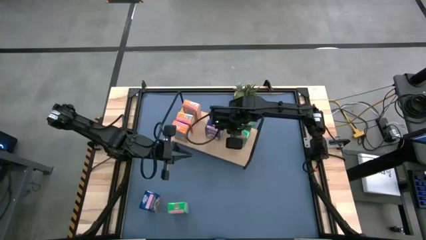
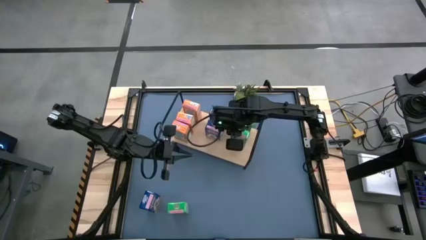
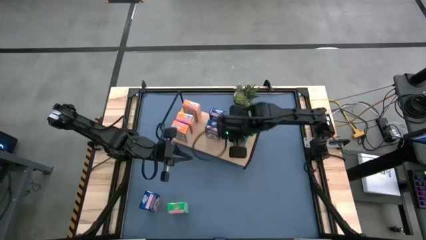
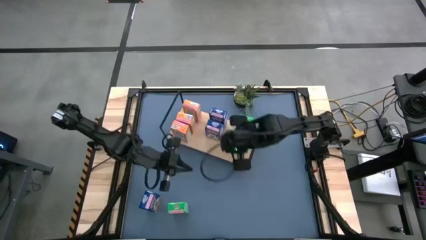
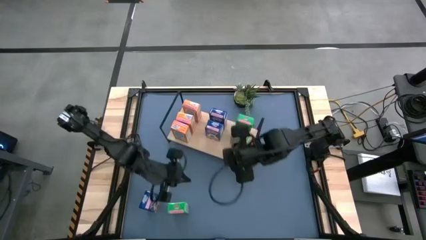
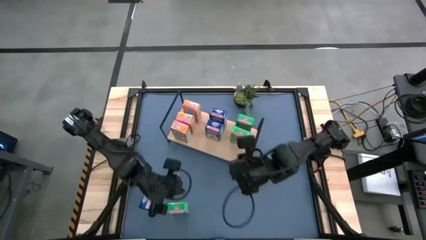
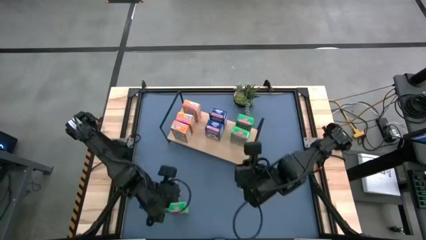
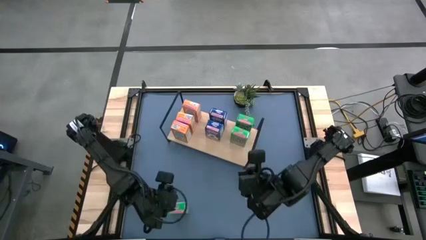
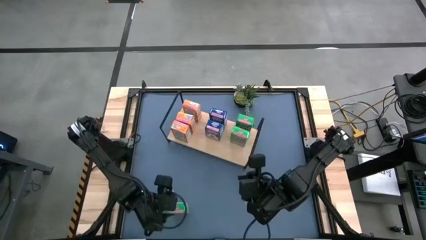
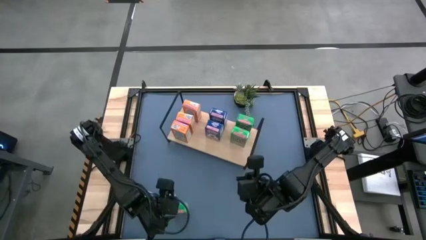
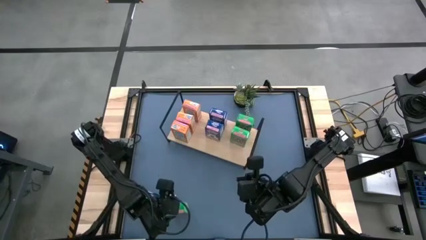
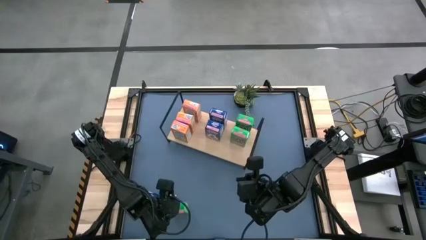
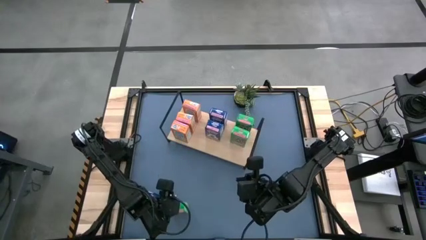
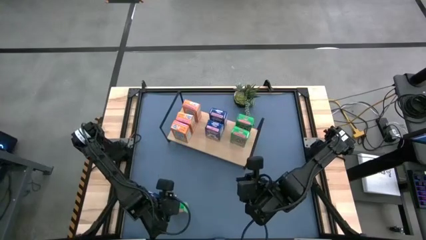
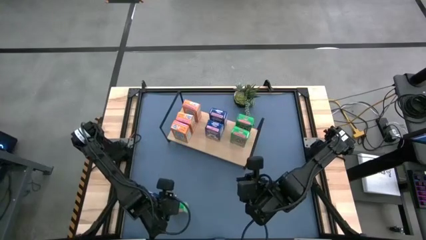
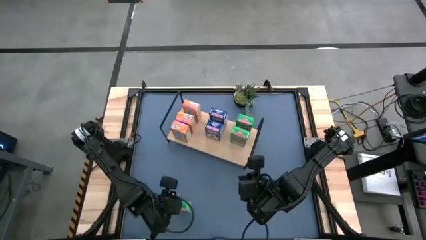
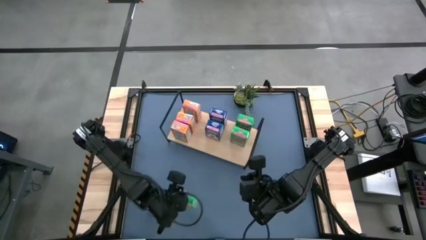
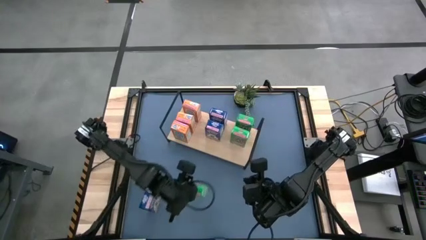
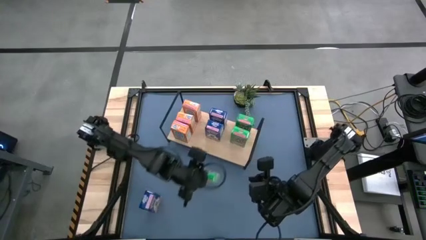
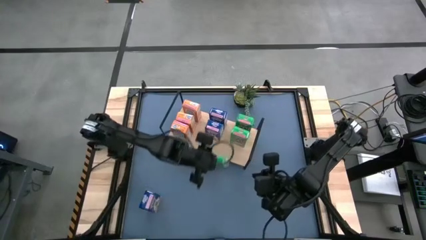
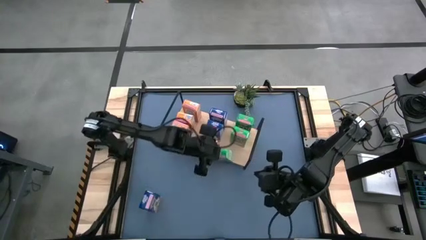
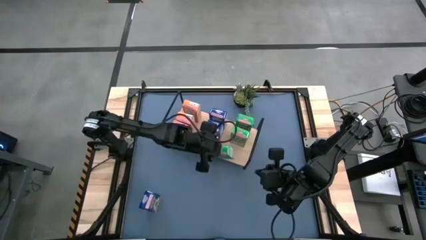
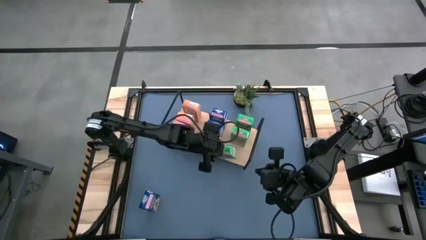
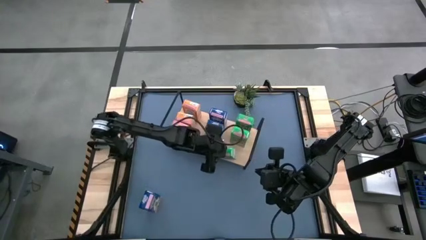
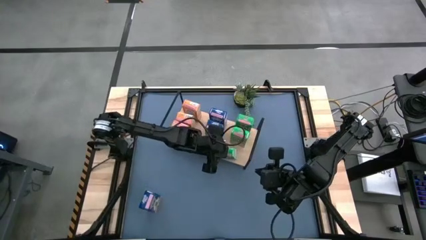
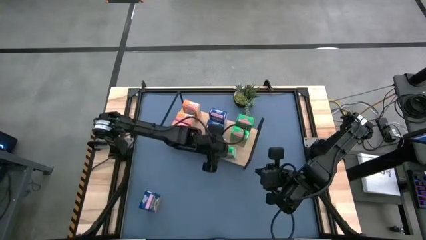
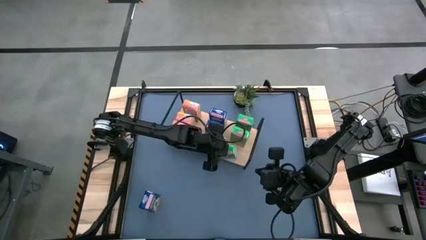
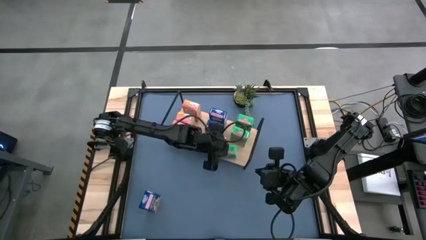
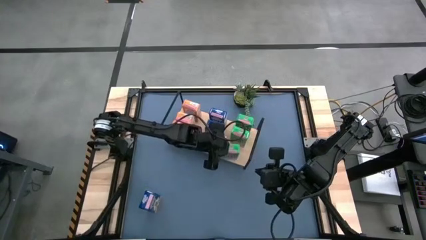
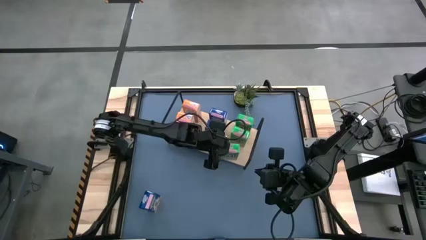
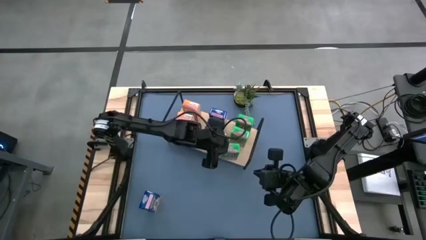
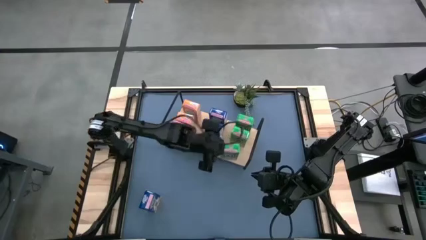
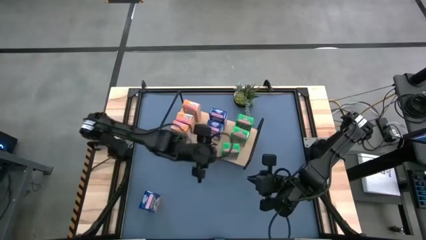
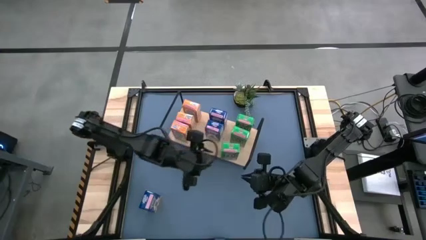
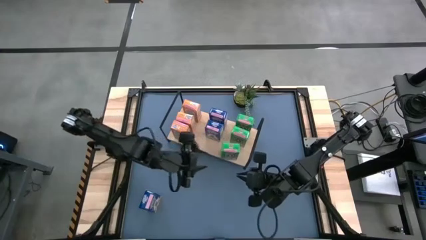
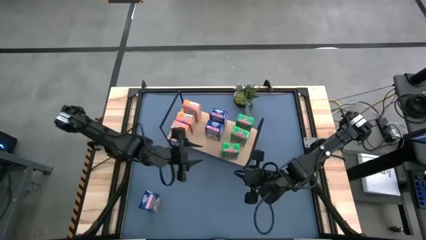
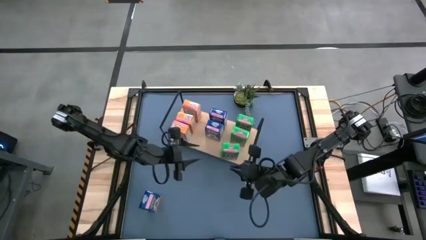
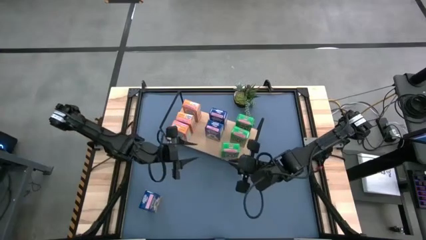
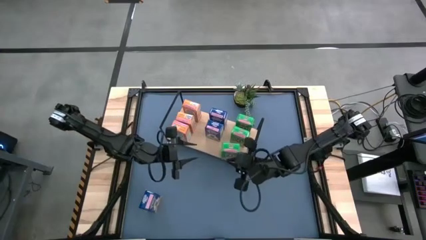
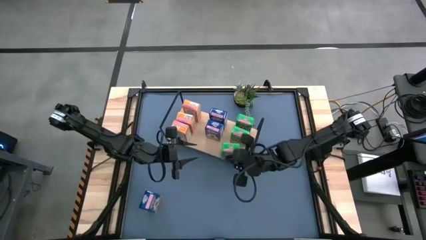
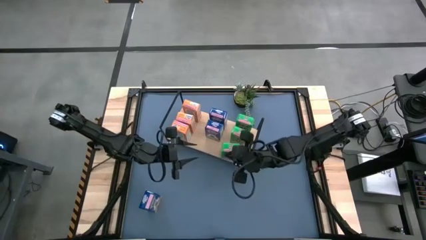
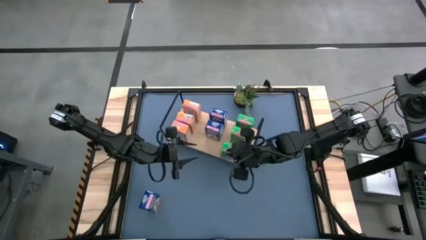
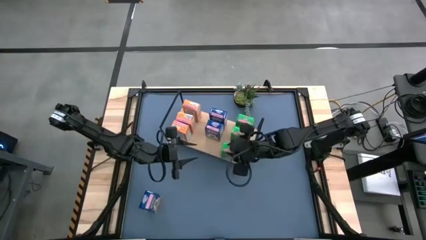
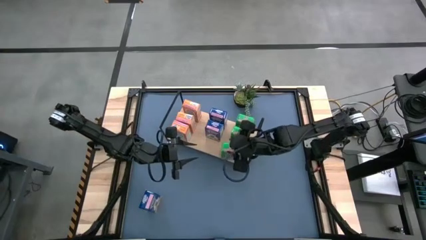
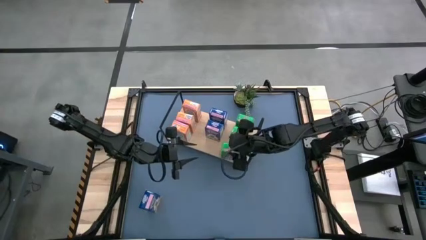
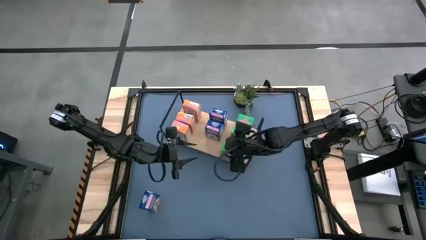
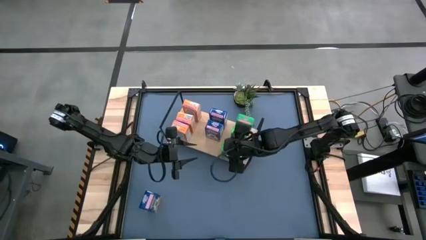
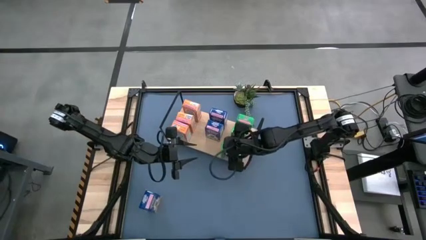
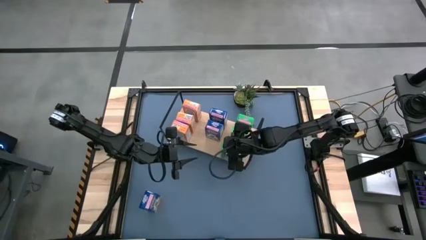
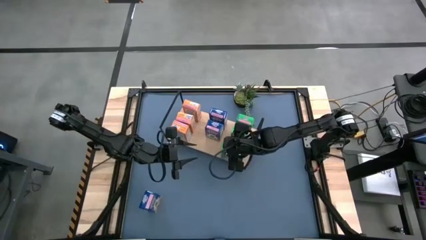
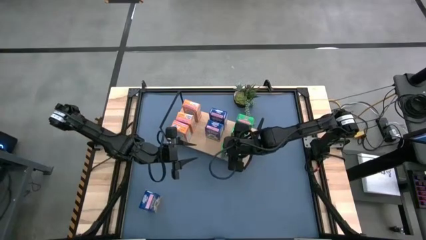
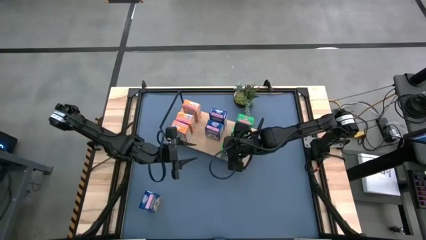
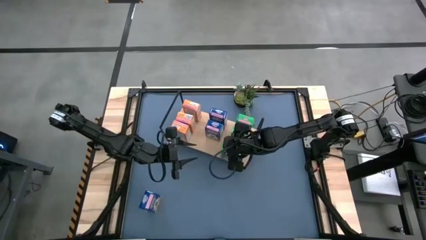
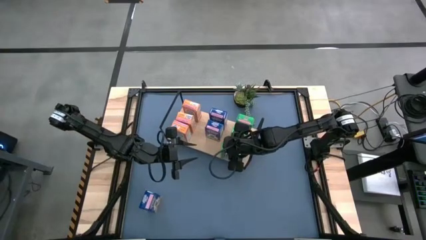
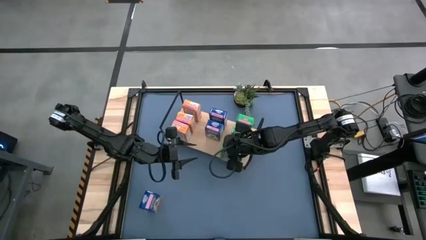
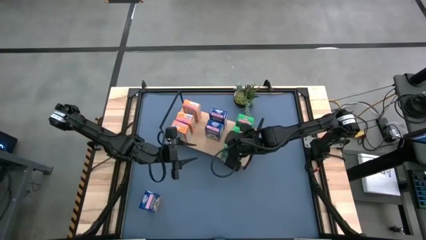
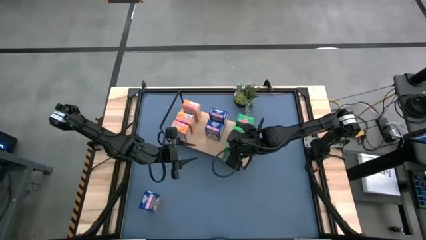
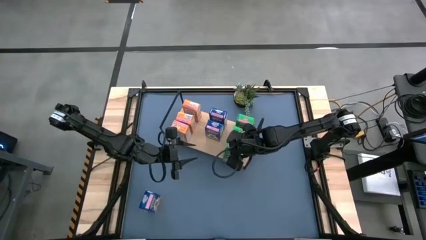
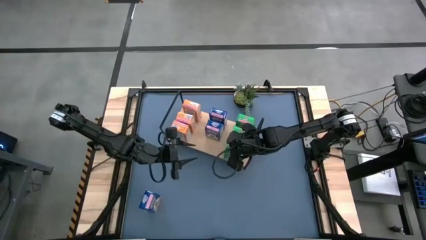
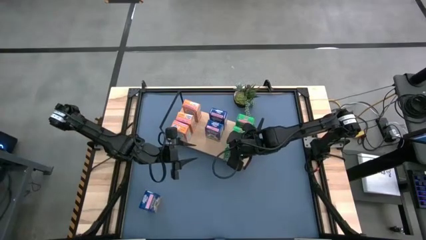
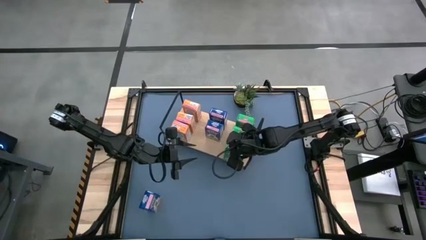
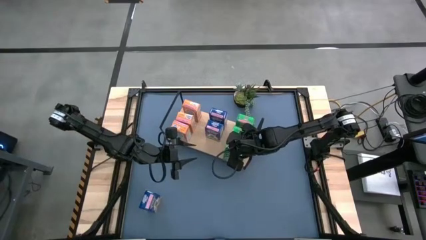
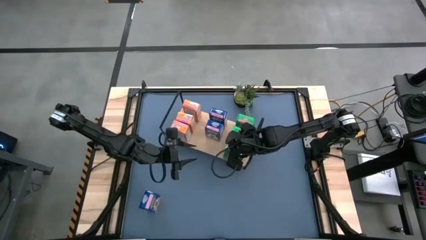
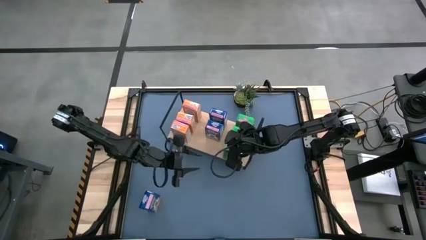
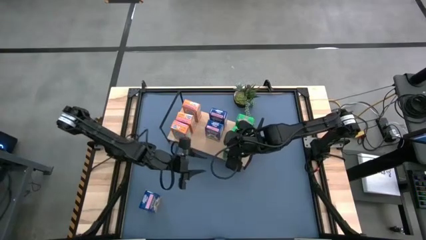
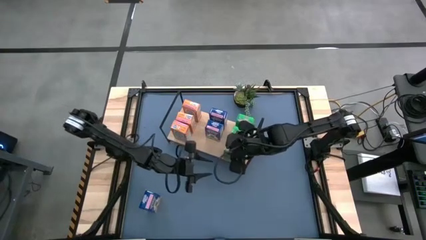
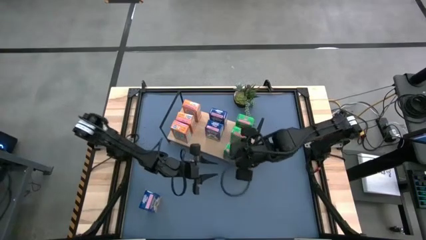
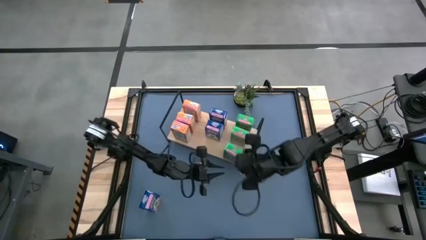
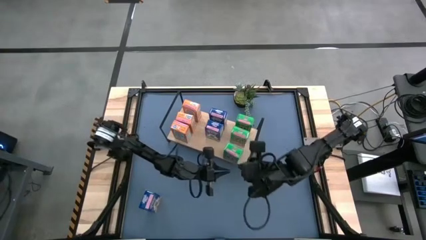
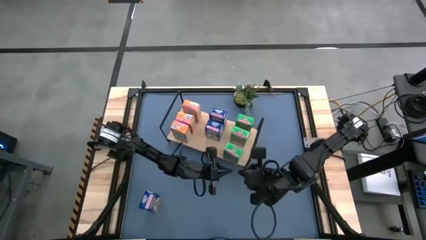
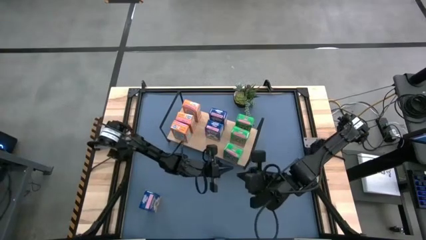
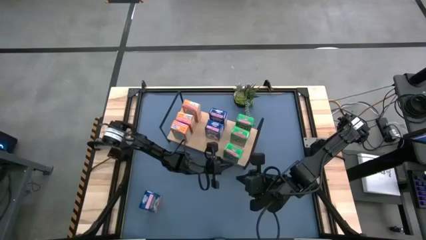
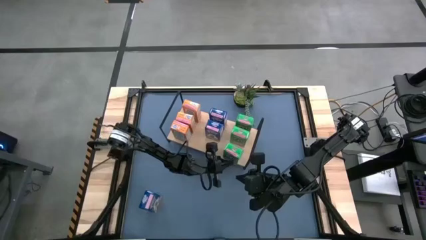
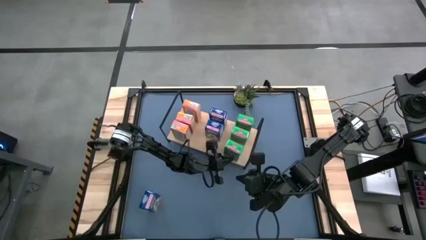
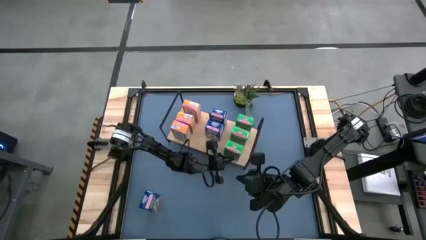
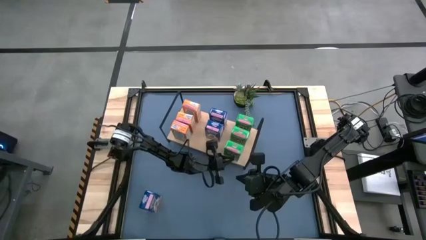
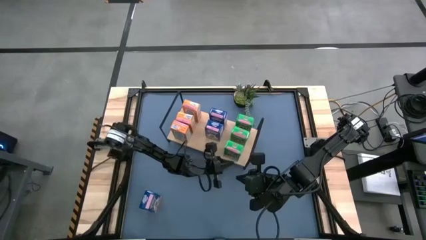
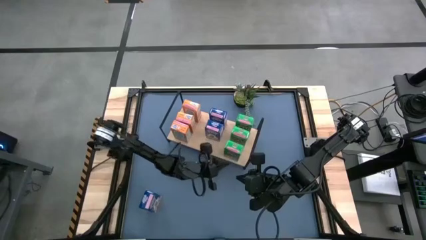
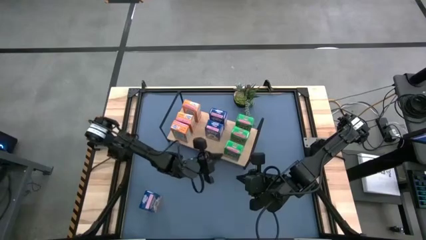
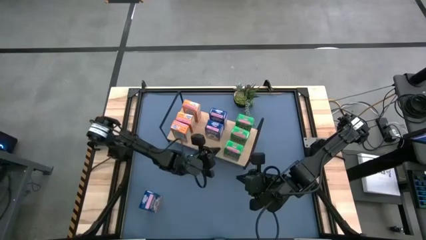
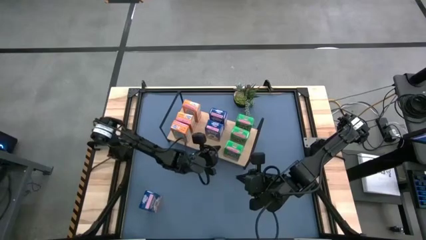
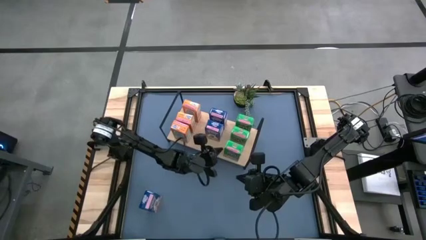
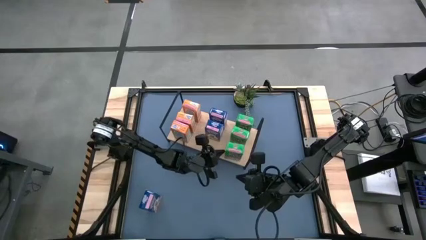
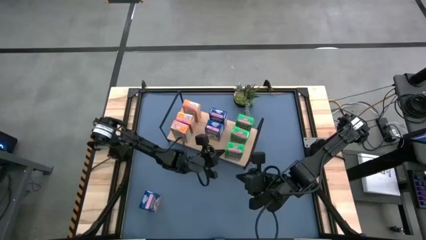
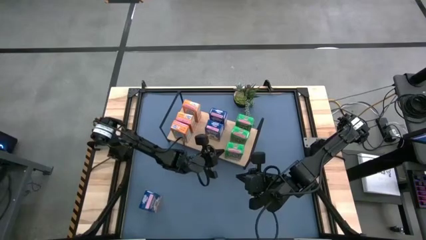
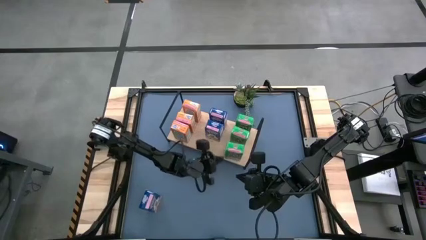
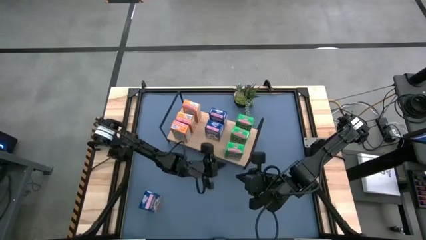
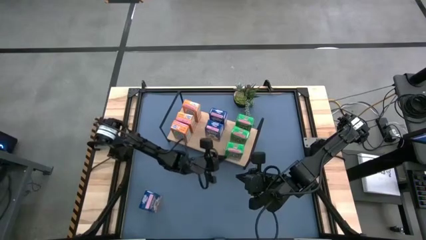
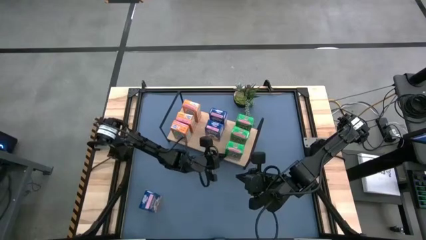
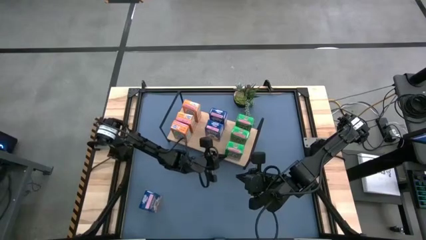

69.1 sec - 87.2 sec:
Task: Stack cereal on shelf
Put the green cereal box on the shelf aligned with other green cereal boxes
